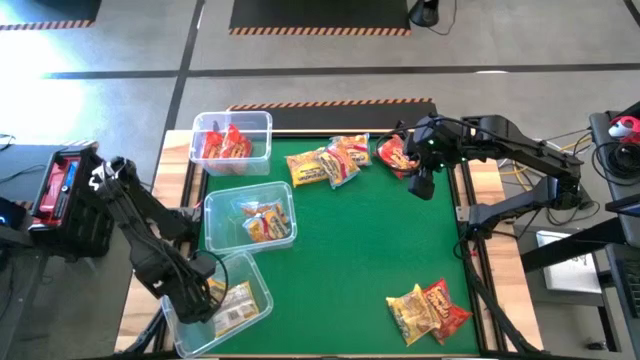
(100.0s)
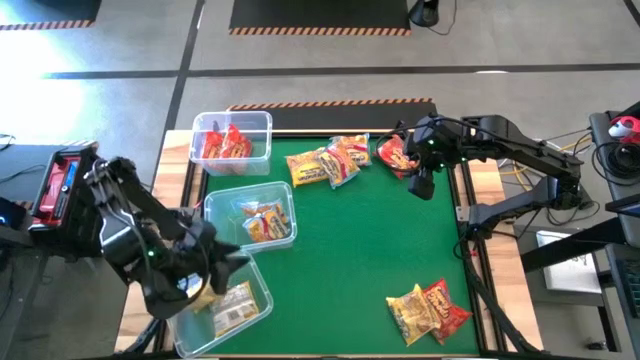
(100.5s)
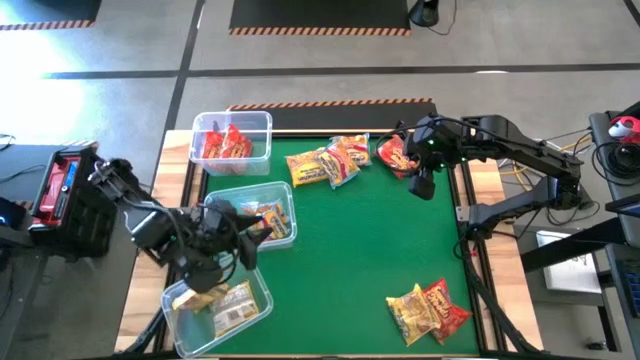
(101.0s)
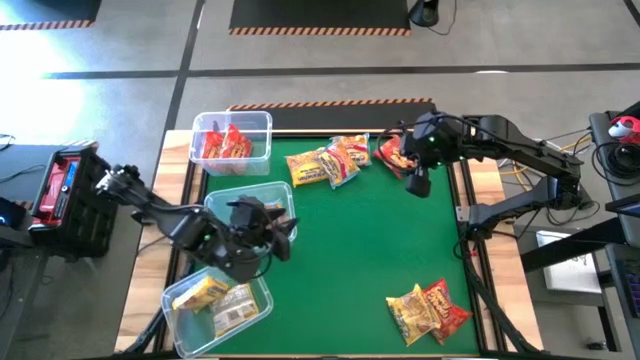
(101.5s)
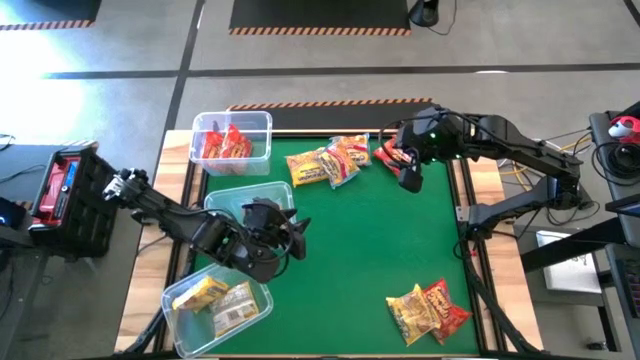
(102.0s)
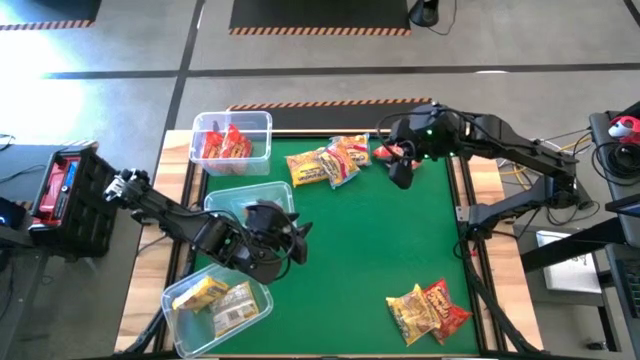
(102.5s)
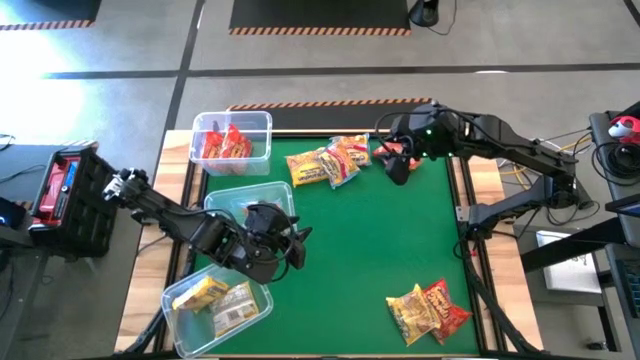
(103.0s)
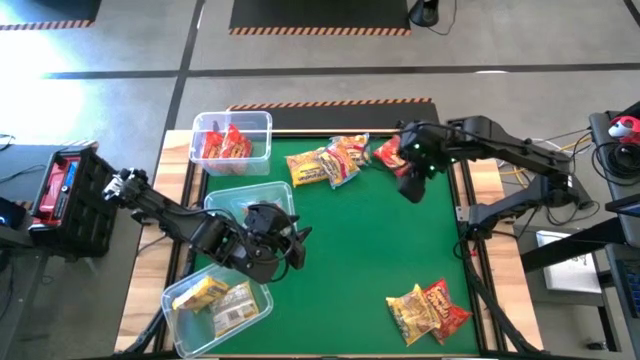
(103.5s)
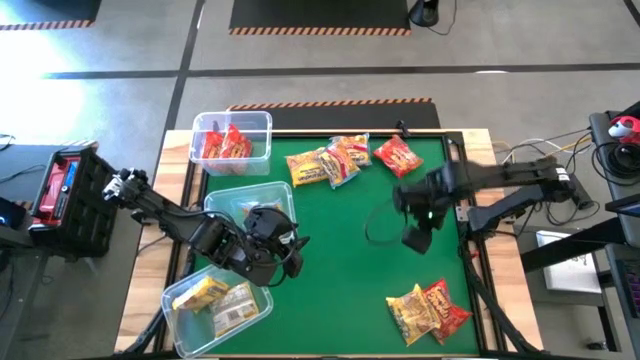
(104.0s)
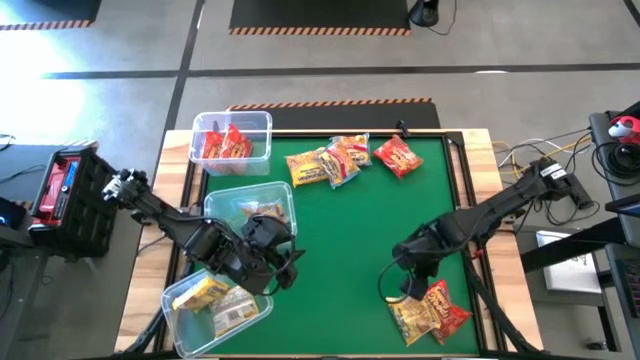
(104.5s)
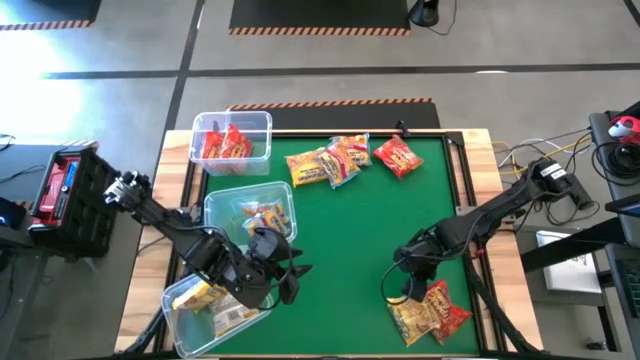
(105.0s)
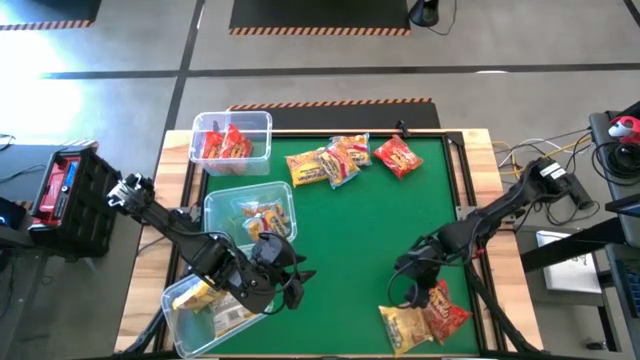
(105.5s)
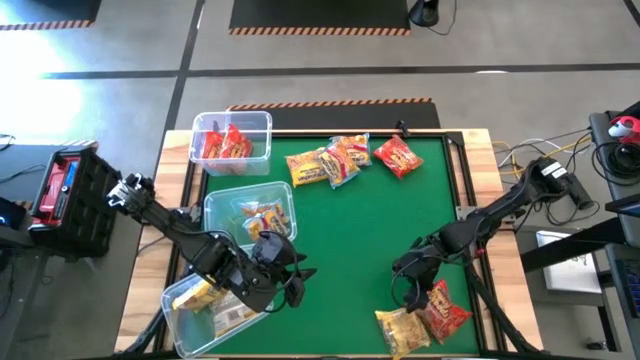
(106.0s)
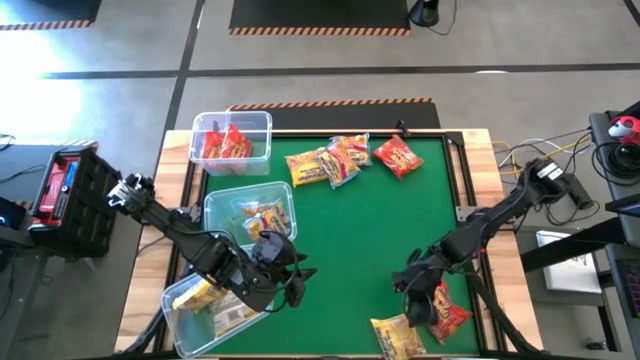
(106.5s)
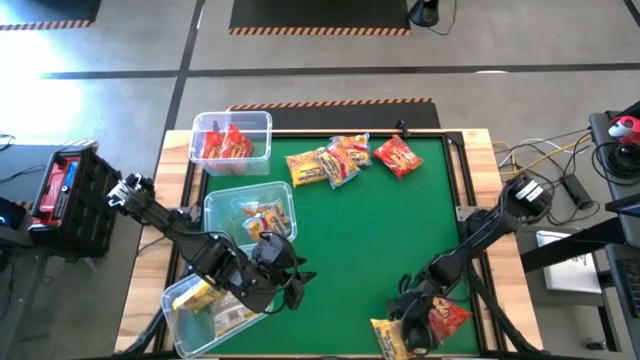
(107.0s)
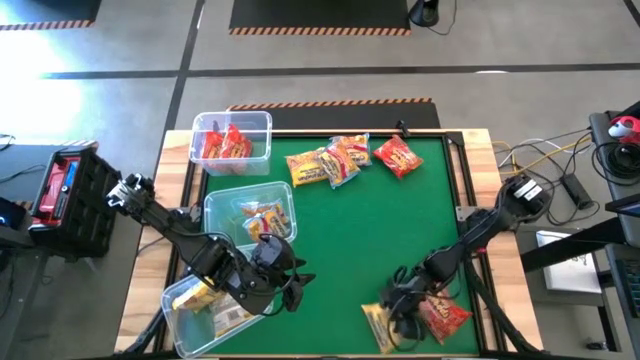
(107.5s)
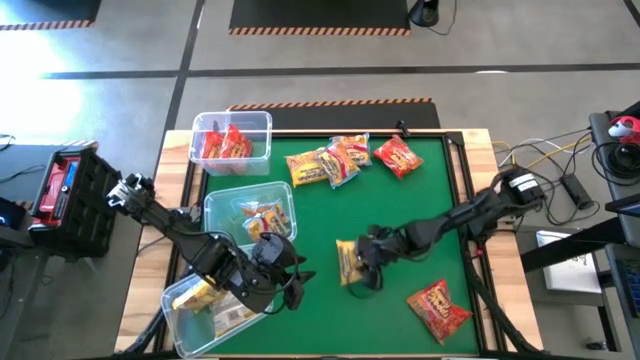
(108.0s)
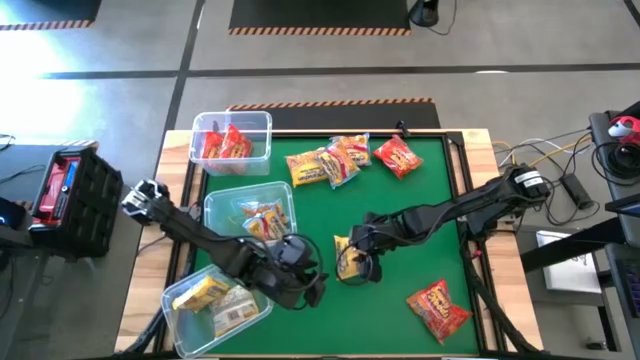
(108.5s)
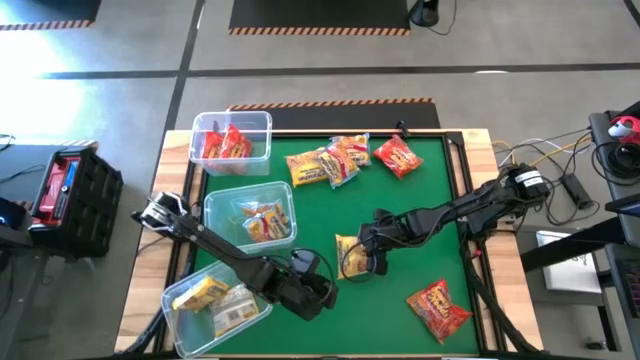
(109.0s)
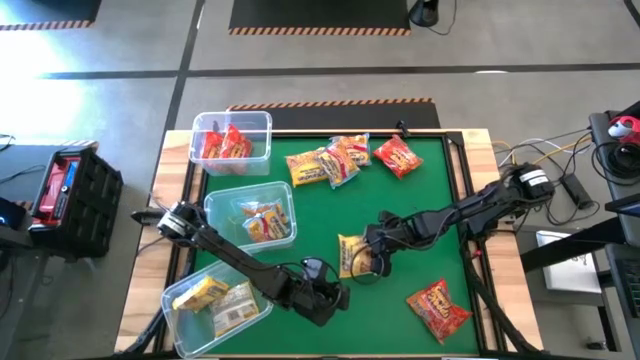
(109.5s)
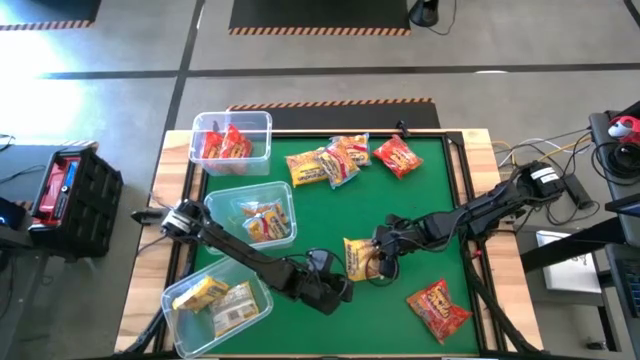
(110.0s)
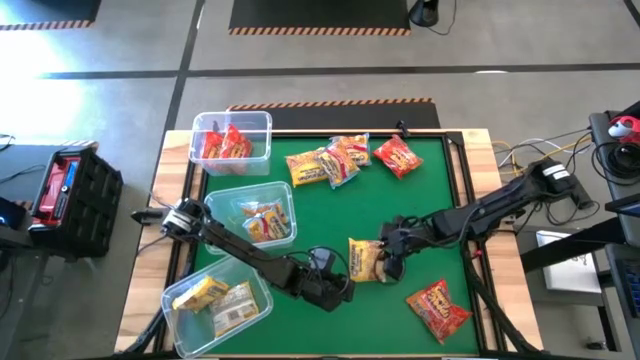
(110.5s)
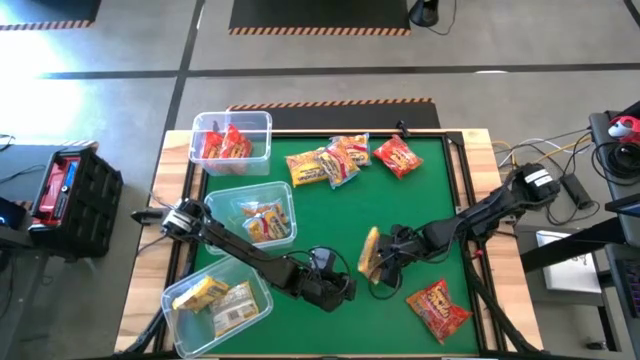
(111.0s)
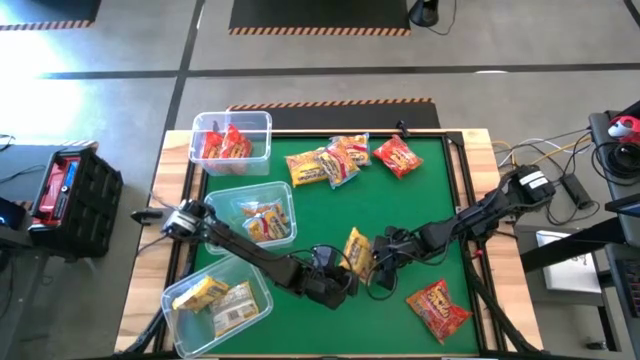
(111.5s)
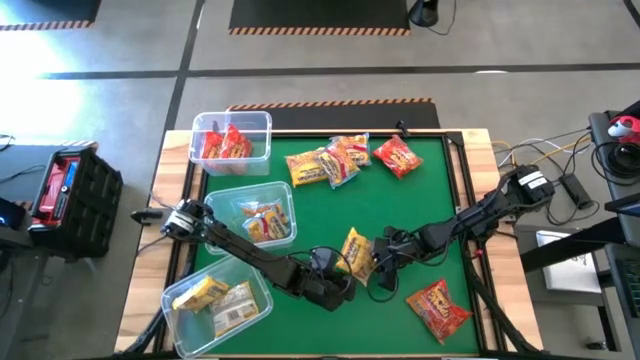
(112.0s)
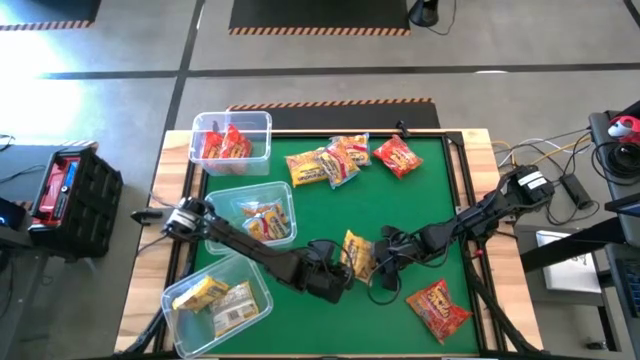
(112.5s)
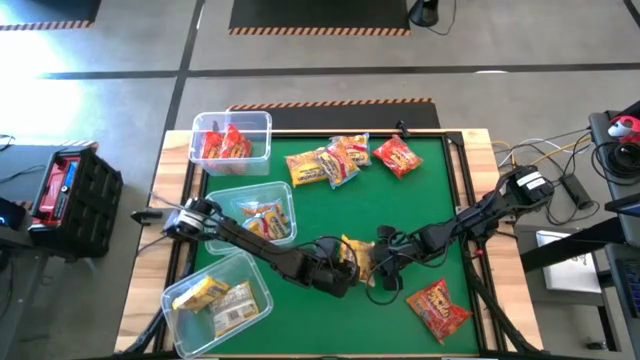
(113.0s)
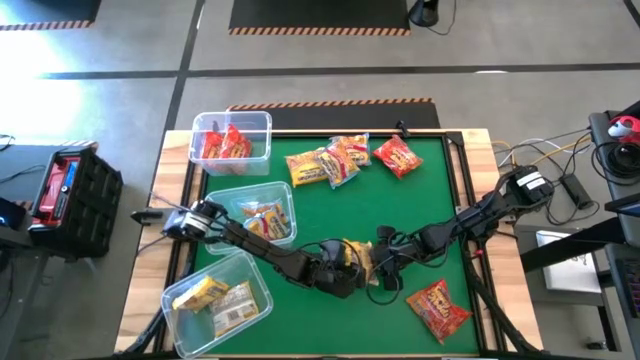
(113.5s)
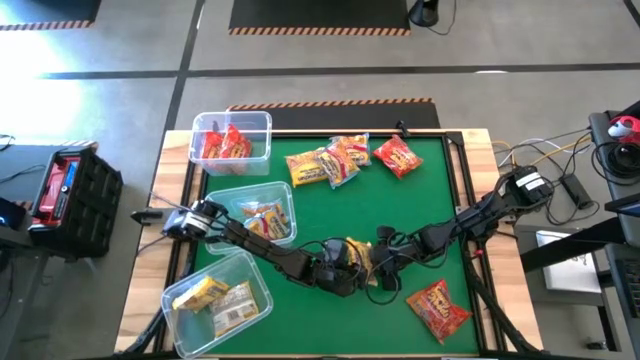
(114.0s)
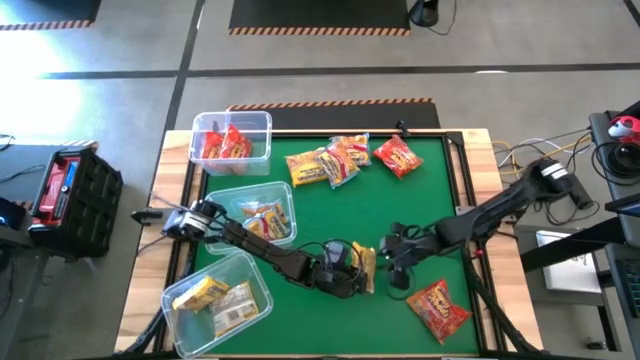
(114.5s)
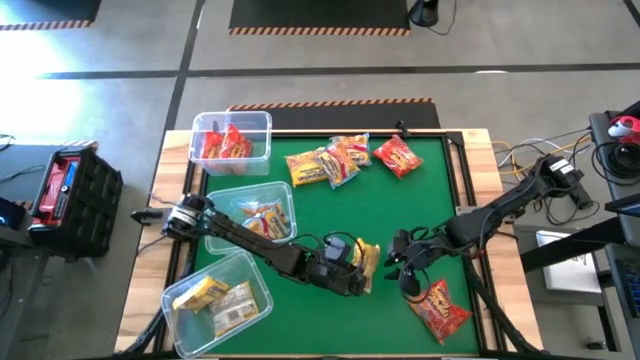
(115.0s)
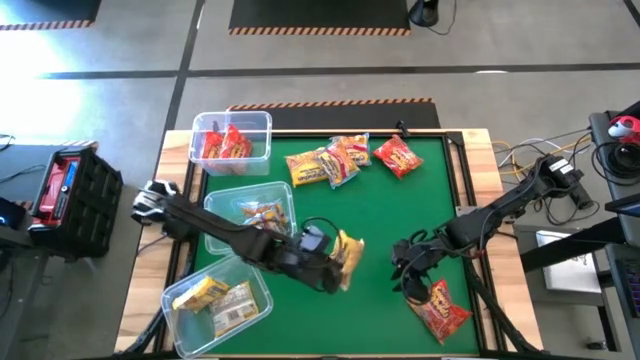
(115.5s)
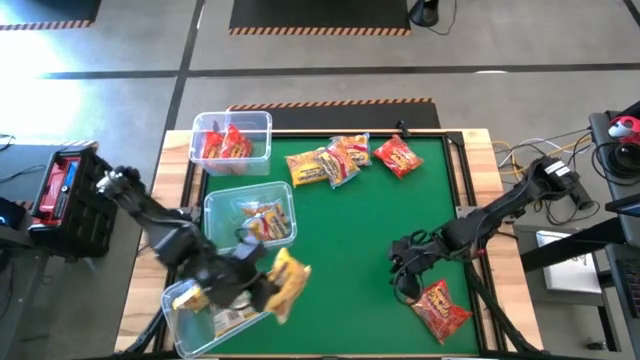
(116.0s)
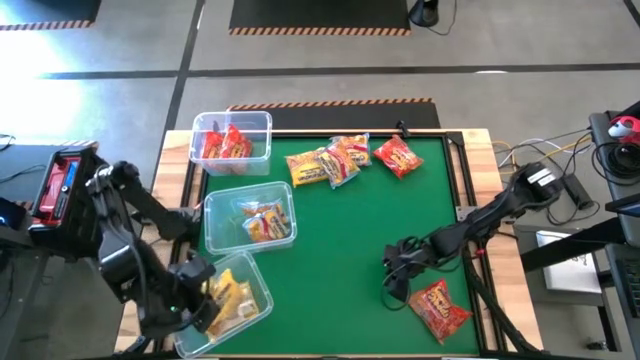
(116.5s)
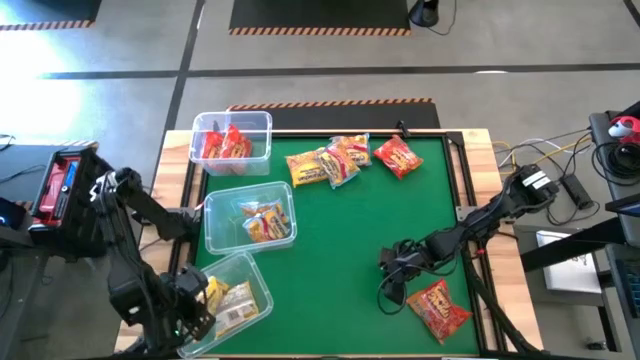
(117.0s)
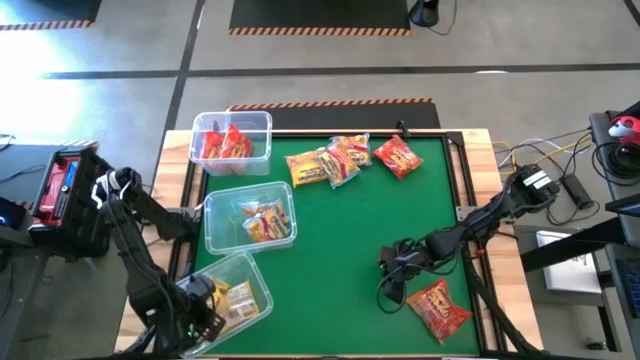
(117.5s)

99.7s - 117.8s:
Task: Sort Maruchan noodles
Put the bottom yellow noodle pack into the bottom transparent bin

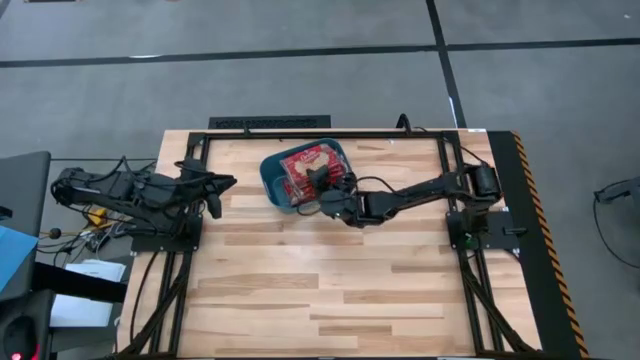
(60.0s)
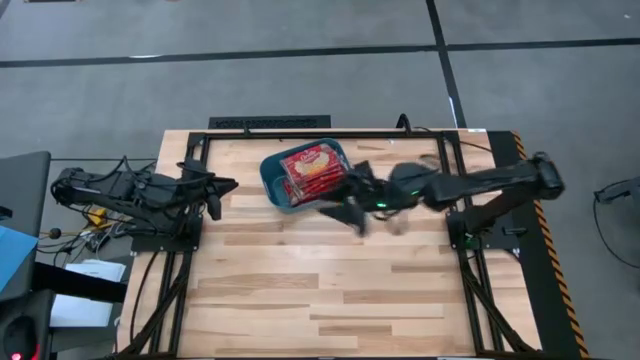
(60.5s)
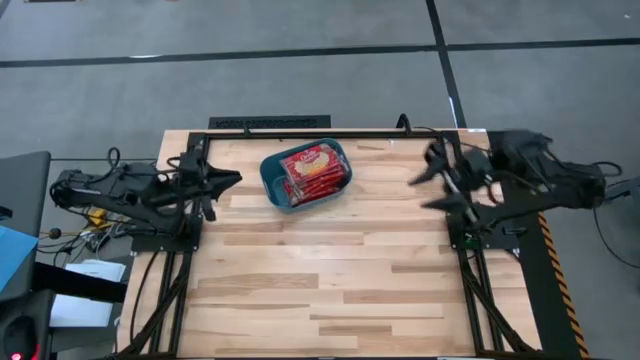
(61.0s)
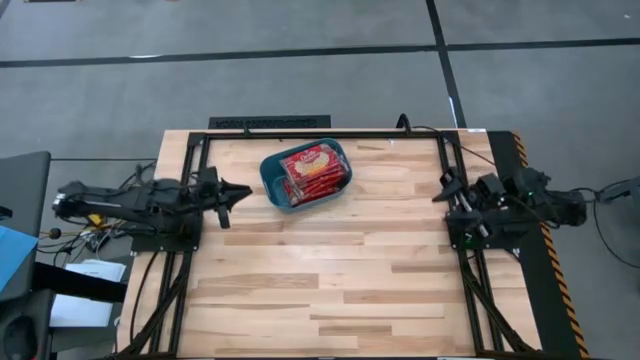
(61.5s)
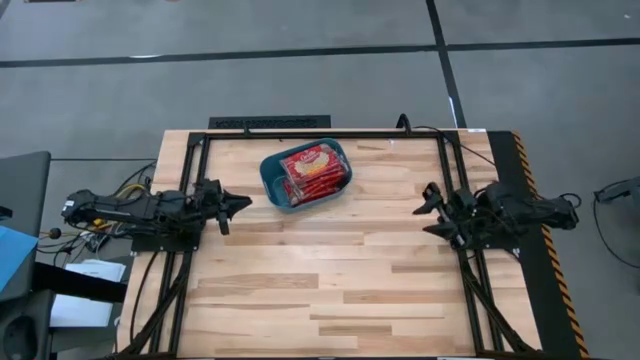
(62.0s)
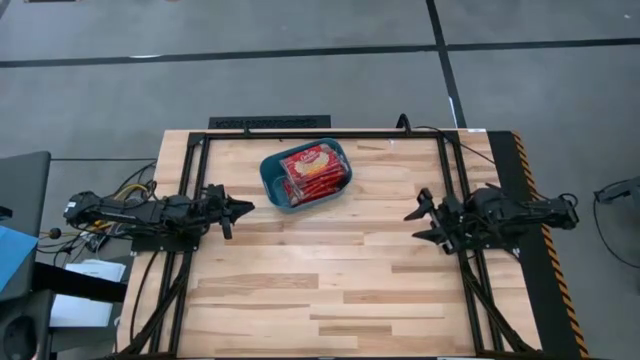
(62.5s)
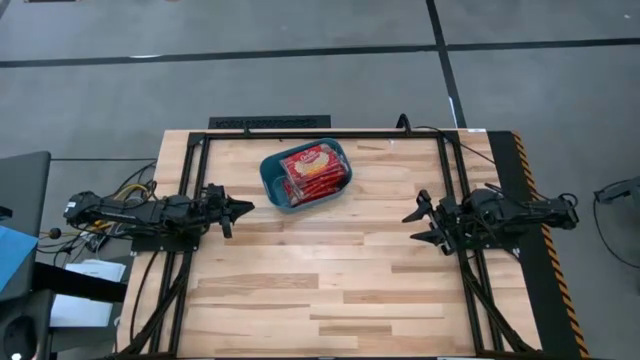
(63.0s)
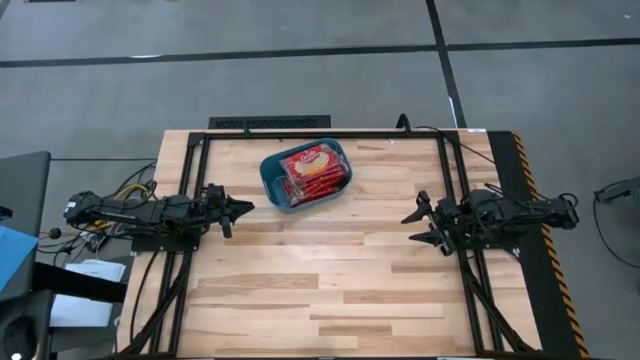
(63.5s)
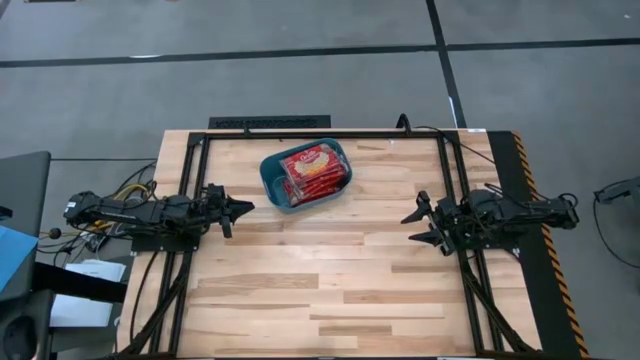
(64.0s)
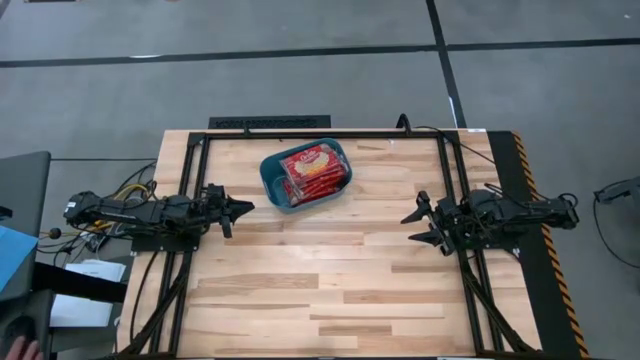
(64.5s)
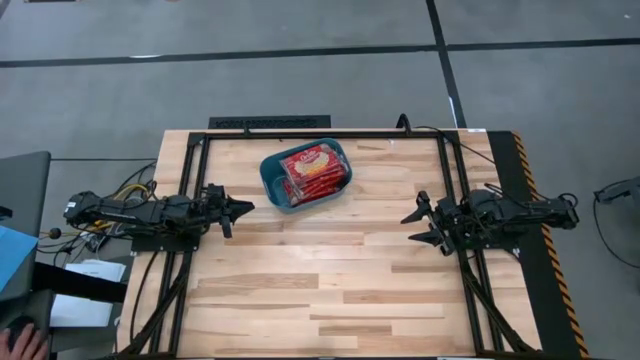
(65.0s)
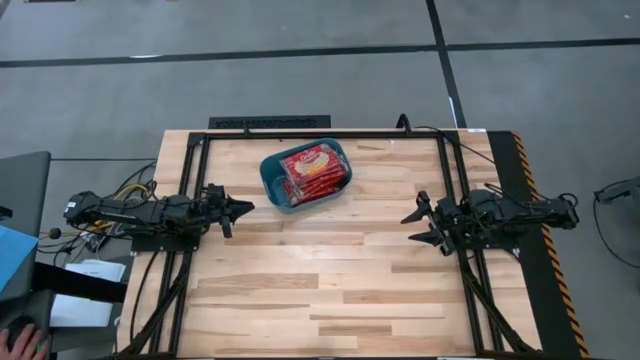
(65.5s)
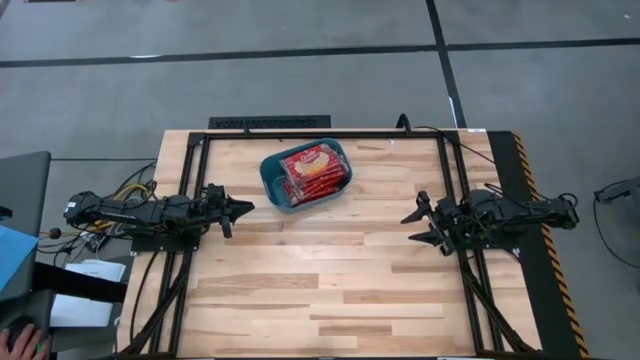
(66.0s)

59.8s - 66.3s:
Task: Sort popcorn bags into baskets
Return to Home Position
